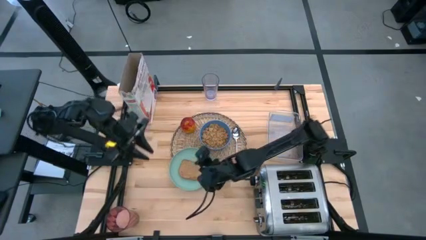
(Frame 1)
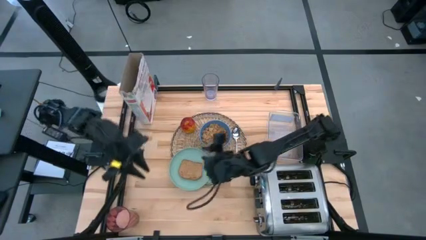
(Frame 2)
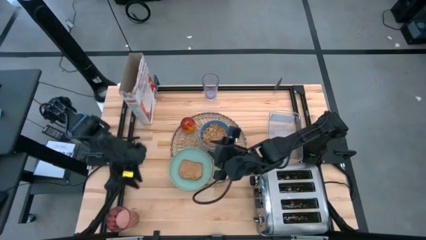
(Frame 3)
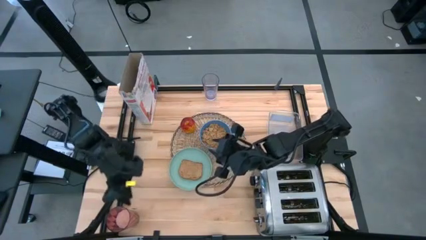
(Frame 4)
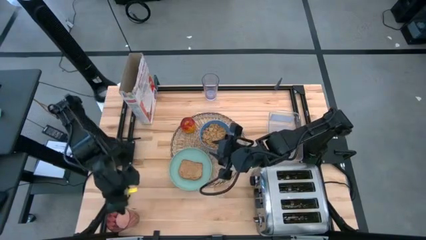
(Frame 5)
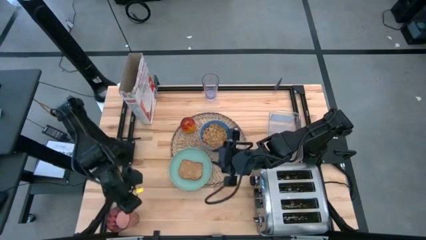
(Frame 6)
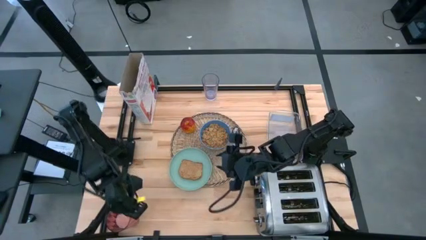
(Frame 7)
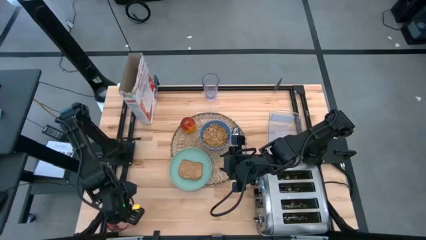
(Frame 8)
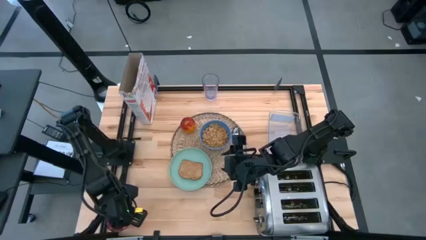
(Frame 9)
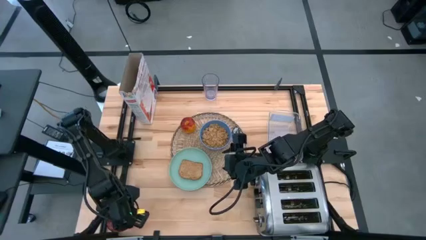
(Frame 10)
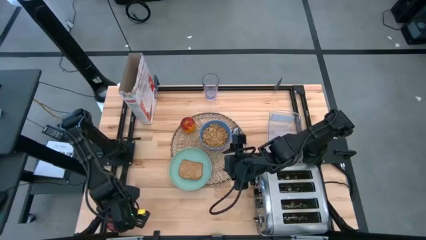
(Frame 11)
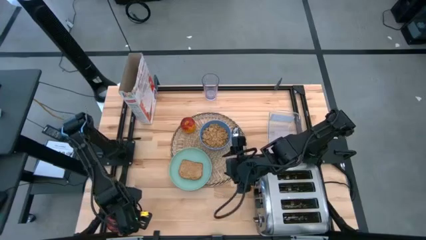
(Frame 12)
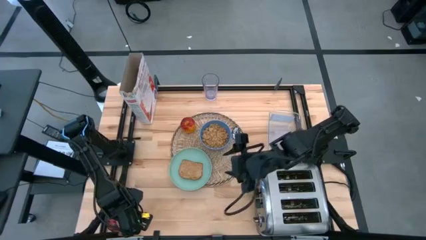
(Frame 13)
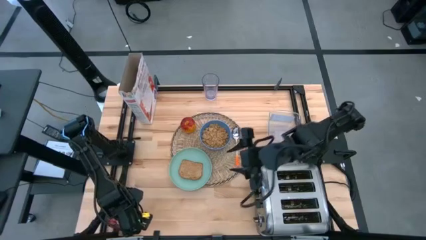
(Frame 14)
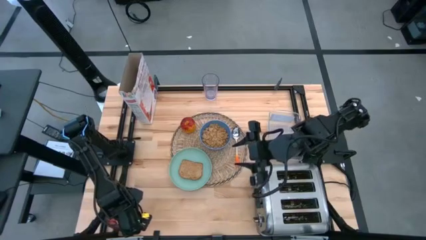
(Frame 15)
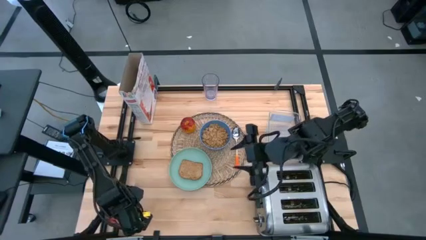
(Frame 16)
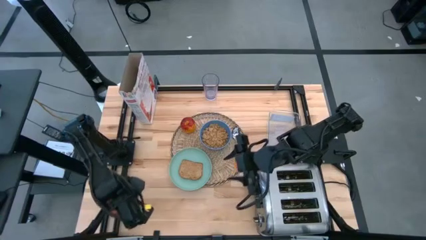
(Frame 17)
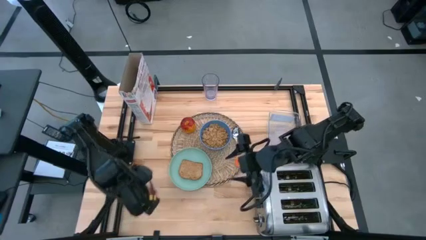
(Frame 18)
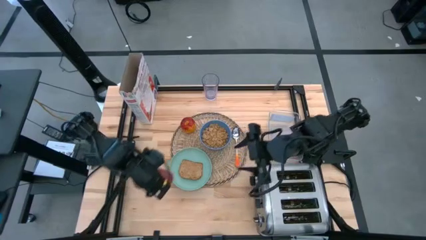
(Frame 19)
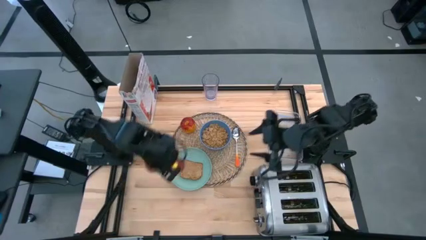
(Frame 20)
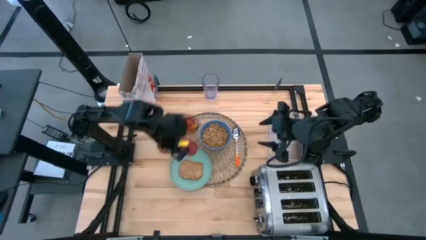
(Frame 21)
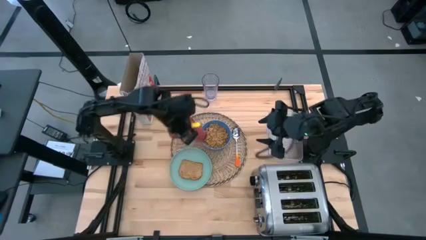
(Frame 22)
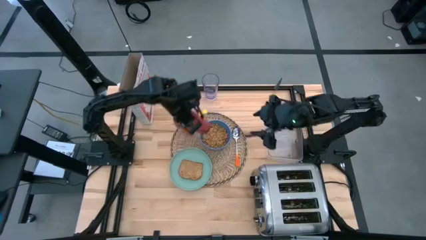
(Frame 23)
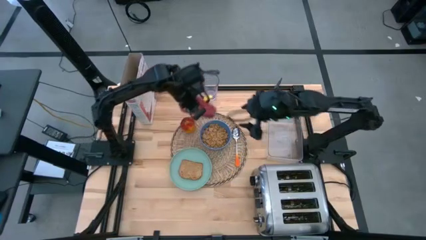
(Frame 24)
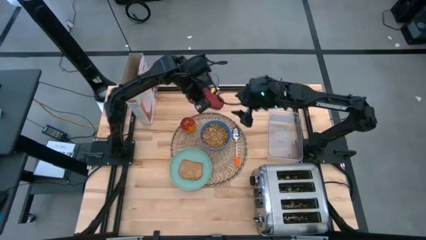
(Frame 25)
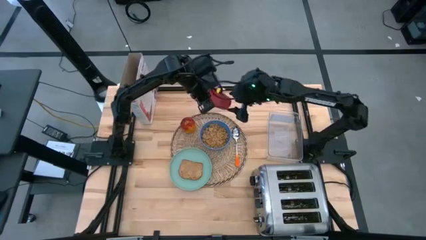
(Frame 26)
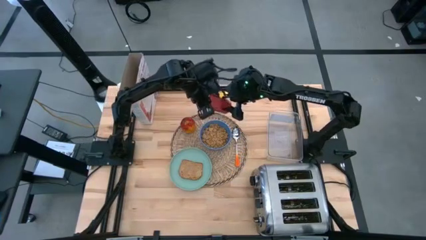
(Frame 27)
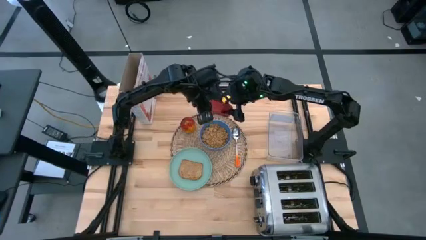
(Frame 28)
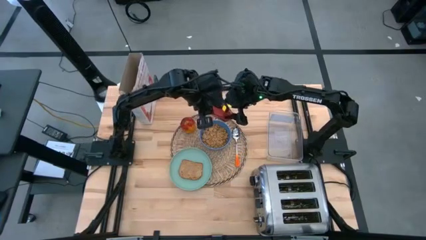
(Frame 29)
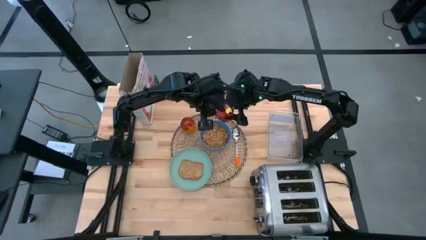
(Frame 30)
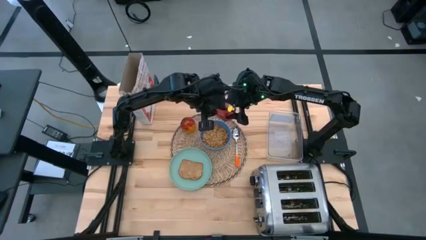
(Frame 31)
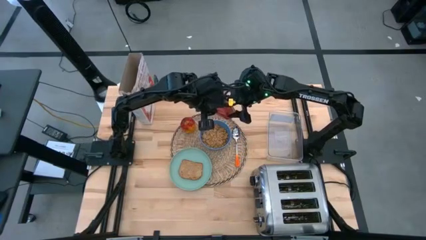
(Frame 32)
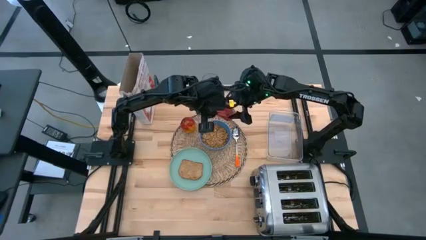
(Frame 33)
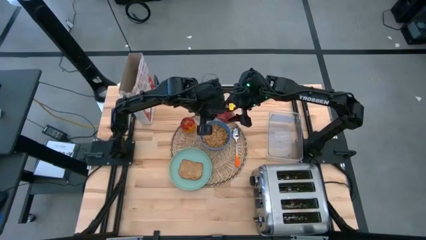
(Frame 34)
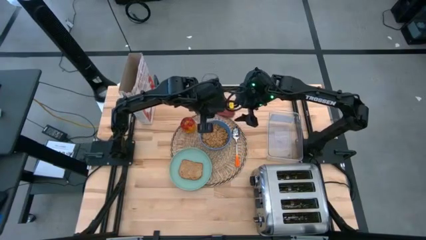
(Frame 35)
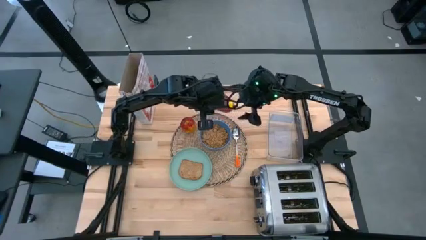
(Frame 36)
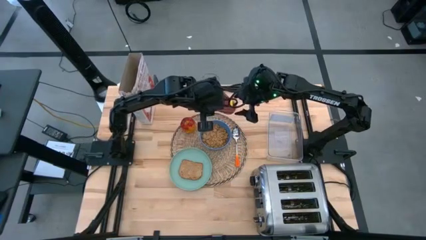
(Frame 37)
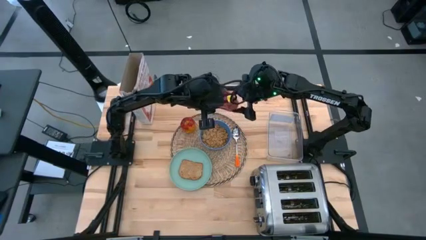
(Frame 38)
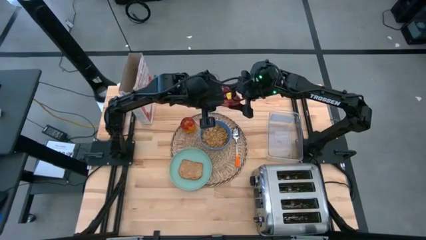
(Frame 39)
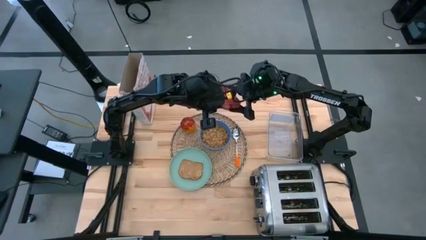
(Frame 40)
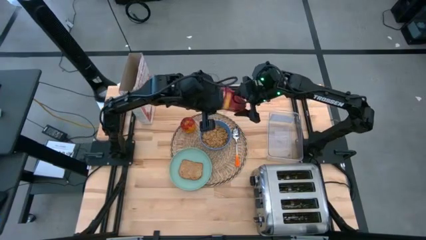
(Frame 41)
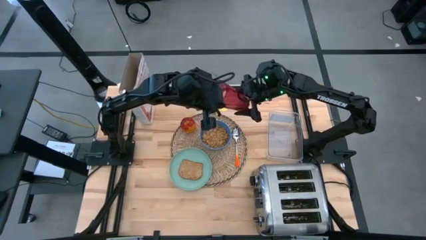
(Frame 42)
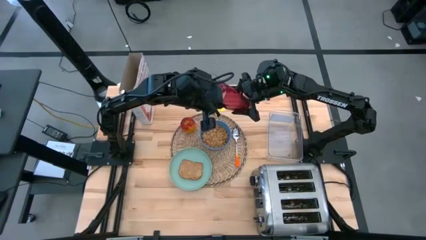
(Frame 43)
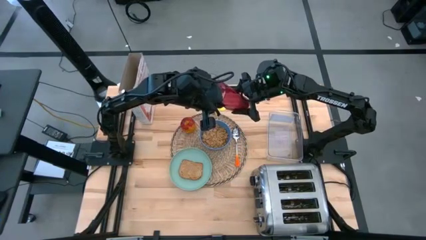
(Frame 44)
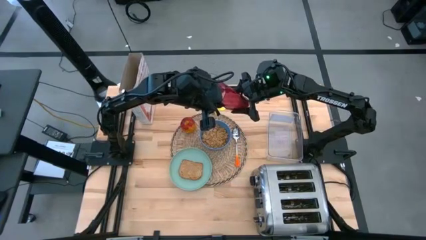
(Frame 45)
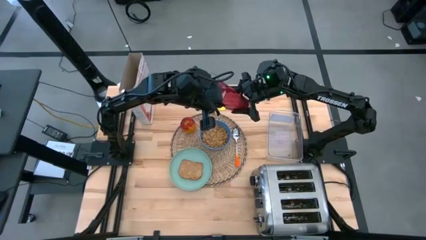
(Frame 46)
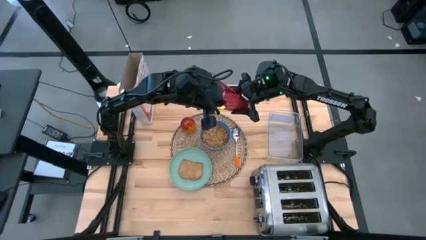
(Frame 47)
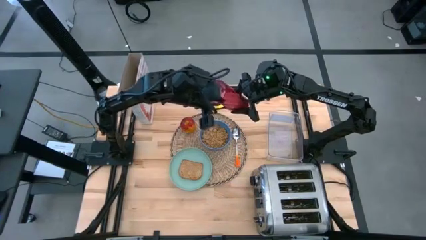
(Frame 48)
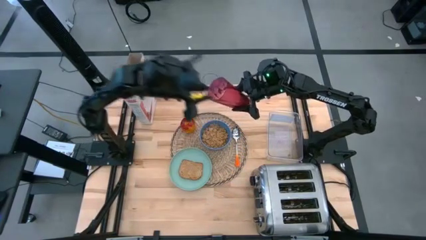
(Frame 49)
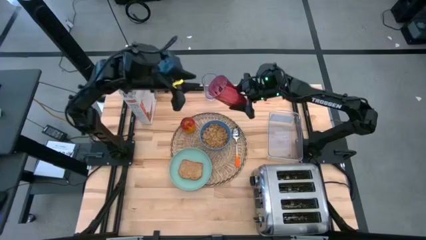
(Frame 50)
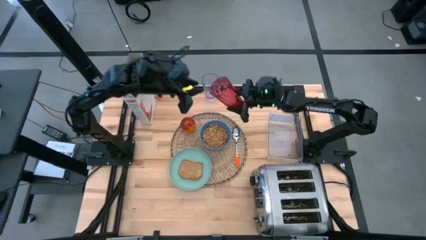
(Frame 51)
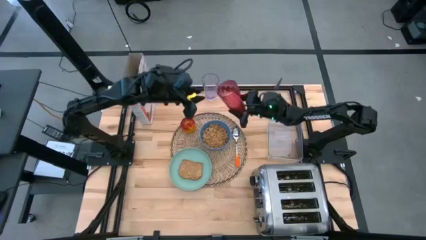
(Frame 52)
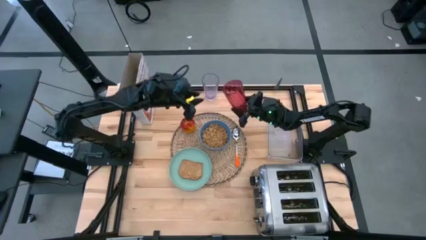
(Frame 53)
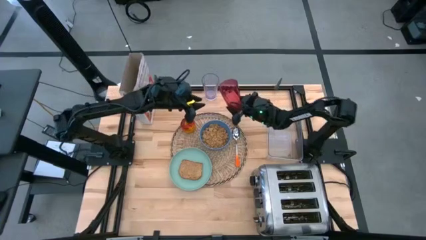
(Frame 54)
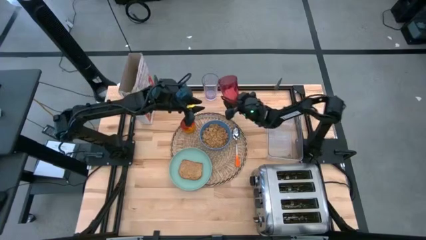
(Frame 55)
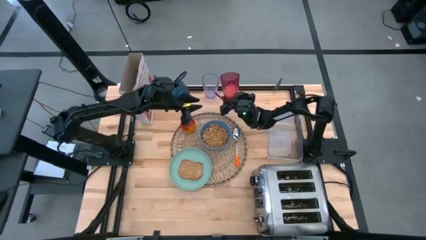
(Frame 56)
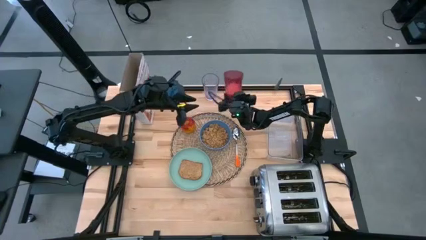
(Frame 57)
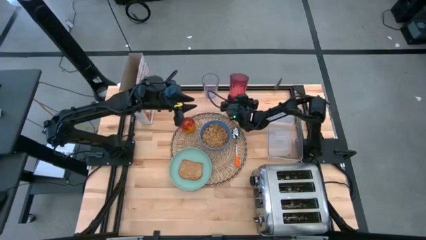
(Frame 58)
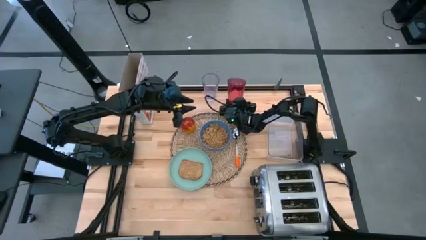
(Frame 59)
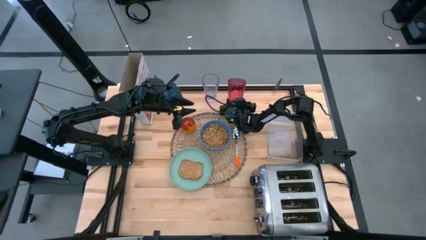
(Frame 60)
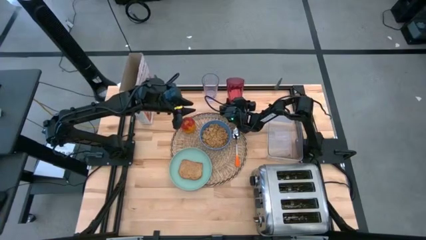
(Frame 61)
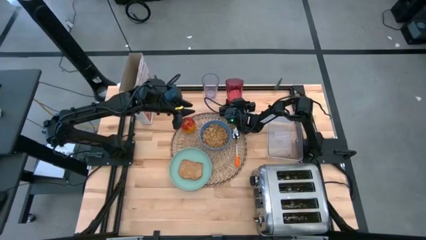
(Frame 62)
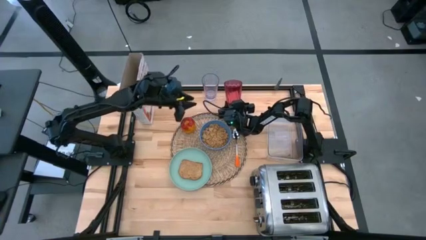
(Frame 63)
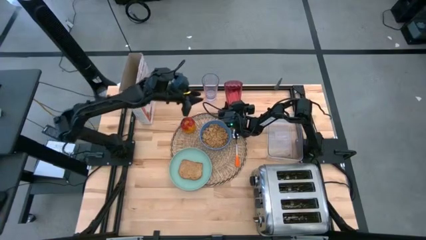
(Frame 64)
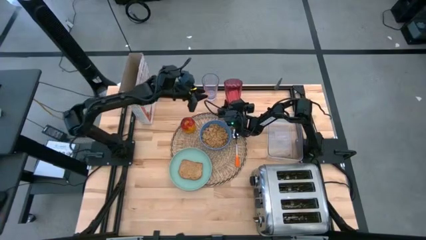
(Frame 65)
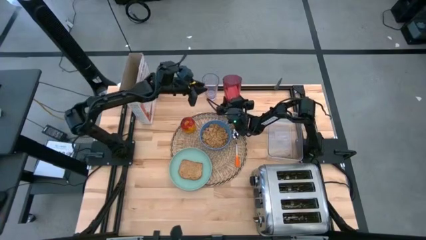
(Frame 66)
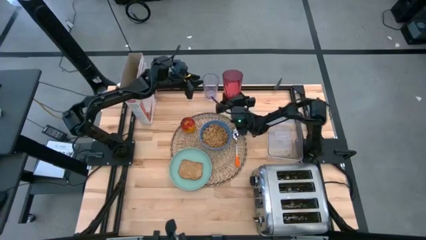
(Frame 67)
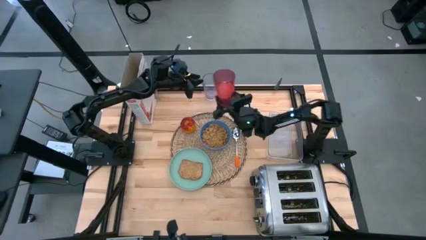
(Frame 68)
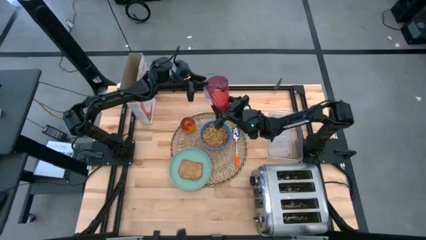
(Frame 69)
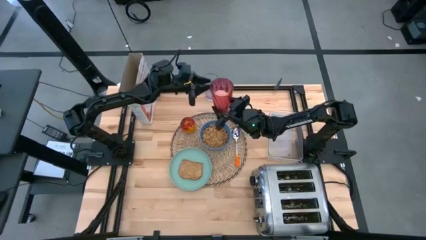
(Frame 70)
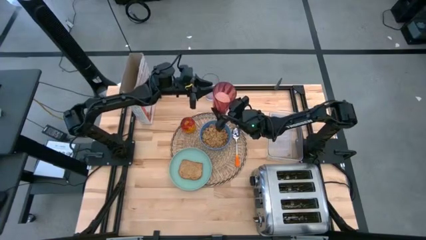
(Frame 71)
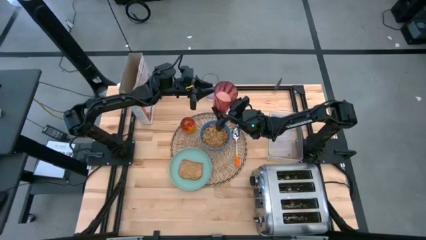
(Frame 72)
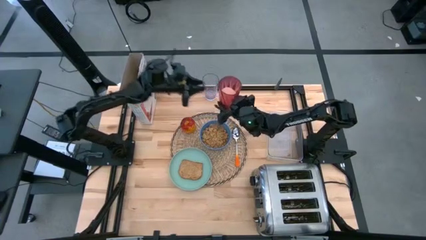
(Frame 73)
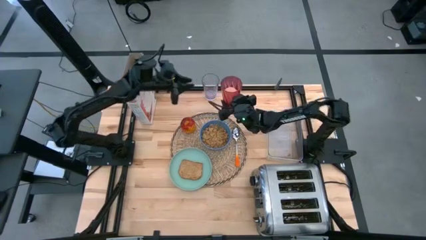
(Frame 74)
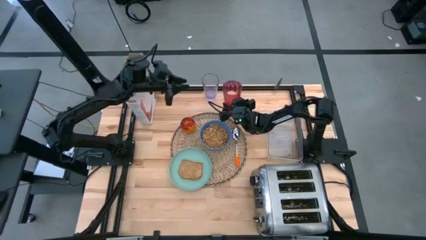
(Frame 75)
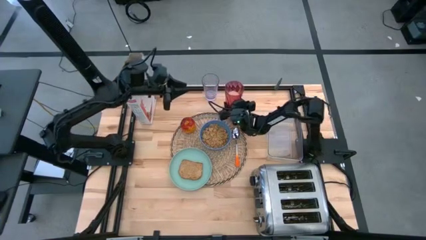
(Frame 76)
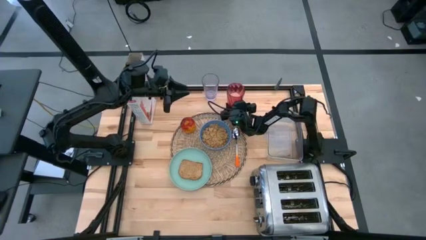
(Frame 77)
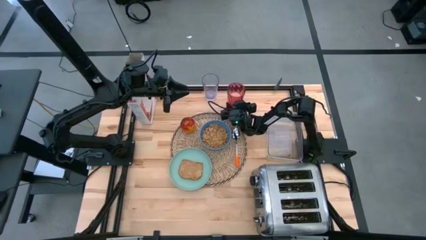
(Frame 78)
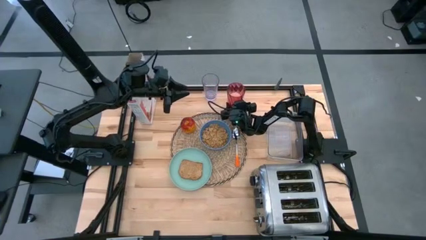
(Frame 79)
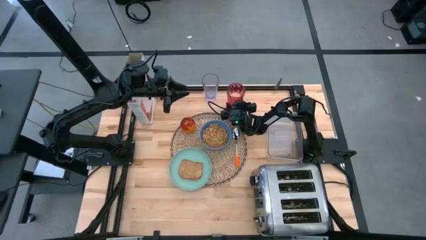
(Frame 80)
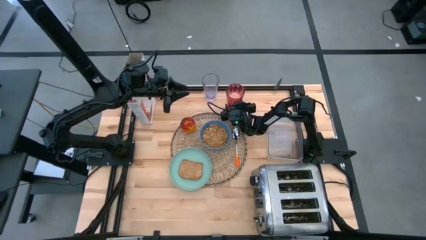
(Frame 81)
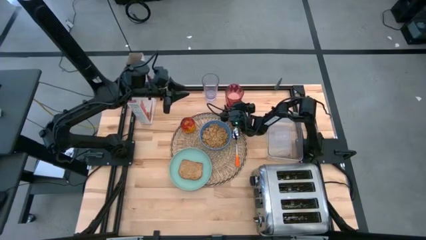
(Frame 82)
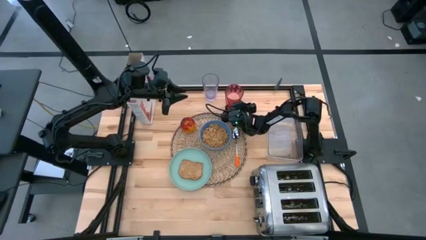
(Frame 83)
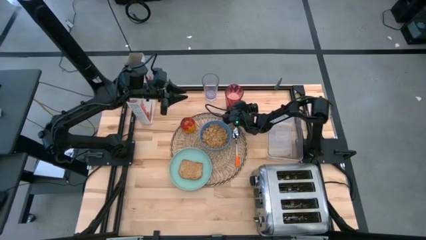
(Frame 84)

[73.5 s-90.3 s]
Task: Arrange a breakfast setting
Put the cup with rice on the table
